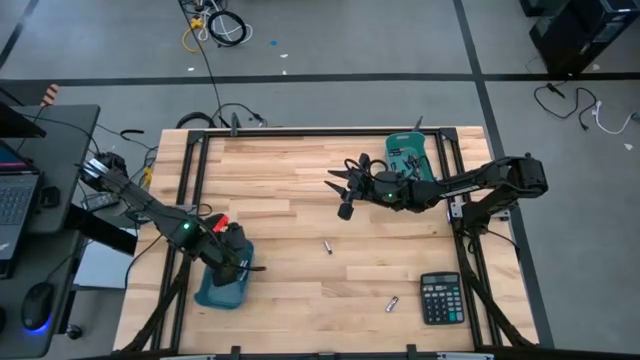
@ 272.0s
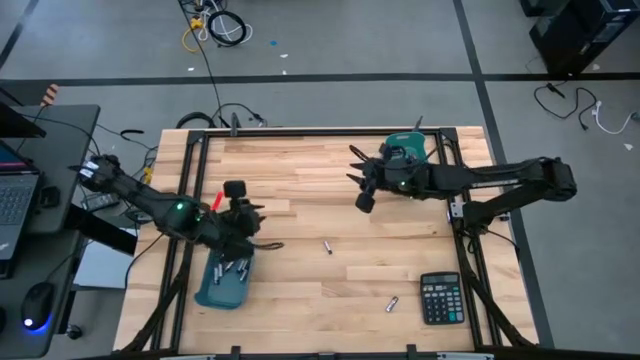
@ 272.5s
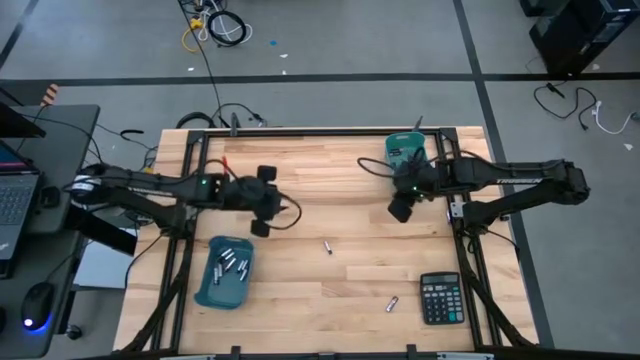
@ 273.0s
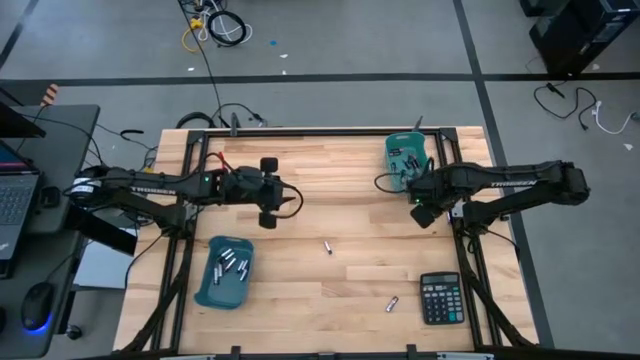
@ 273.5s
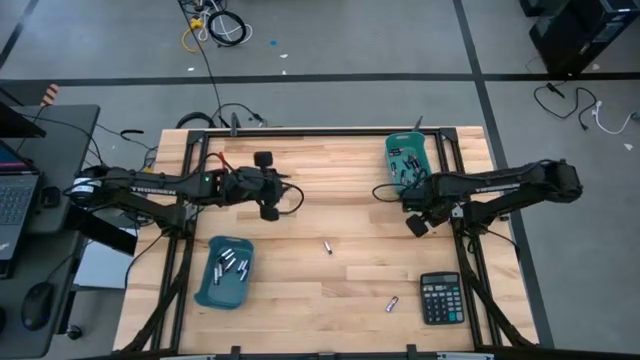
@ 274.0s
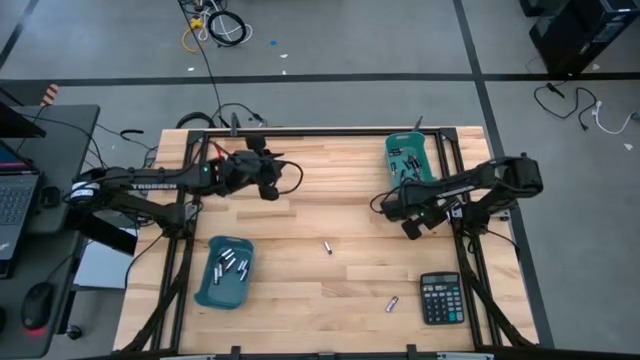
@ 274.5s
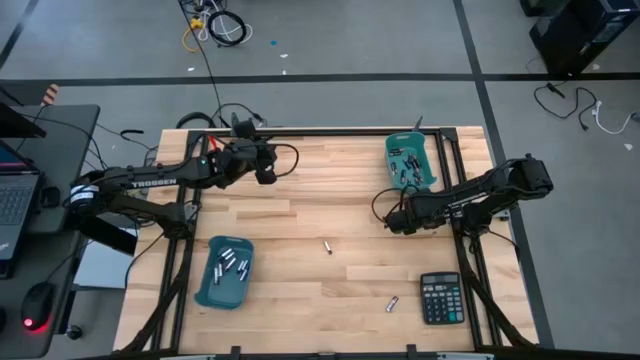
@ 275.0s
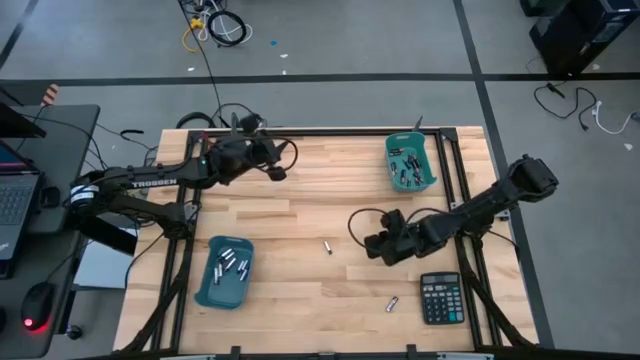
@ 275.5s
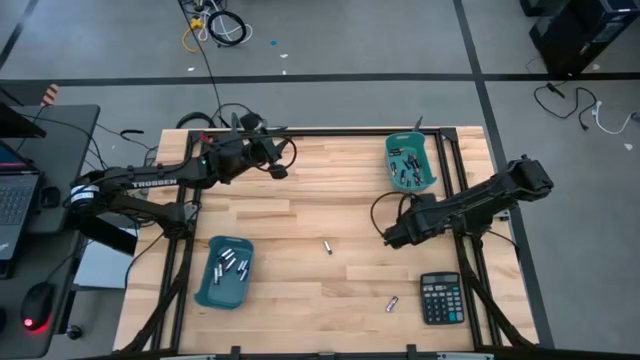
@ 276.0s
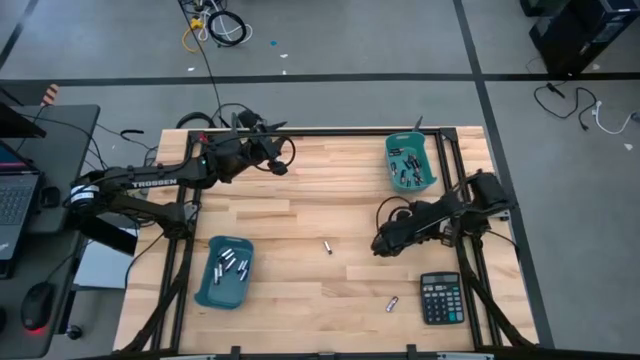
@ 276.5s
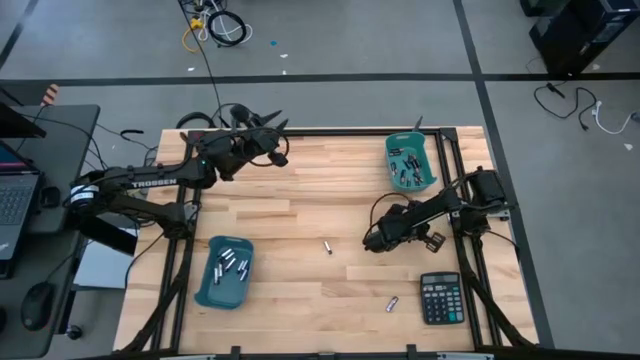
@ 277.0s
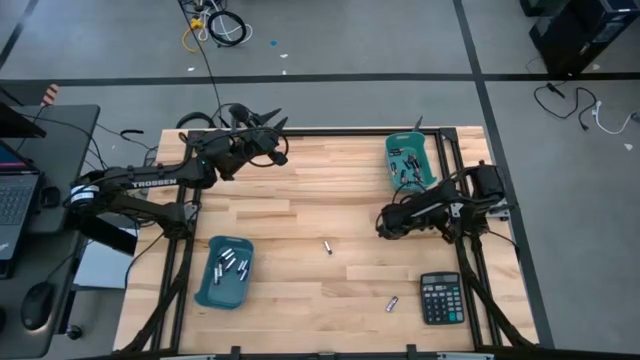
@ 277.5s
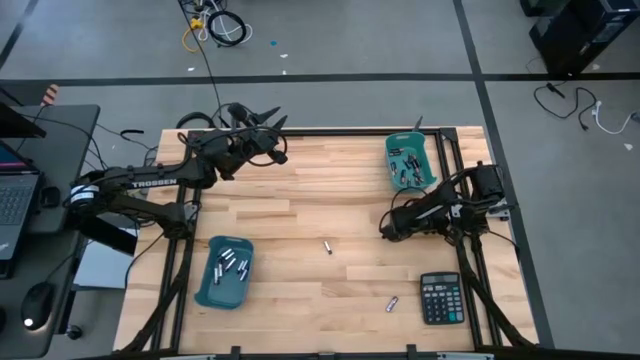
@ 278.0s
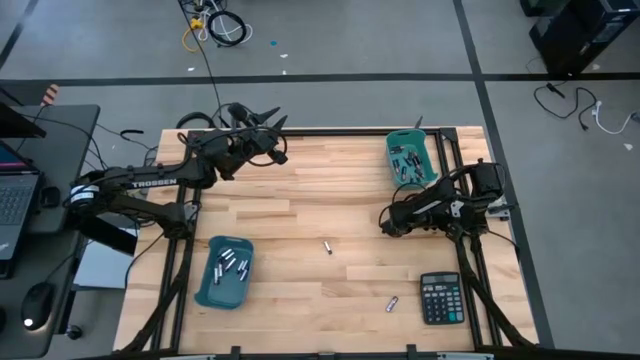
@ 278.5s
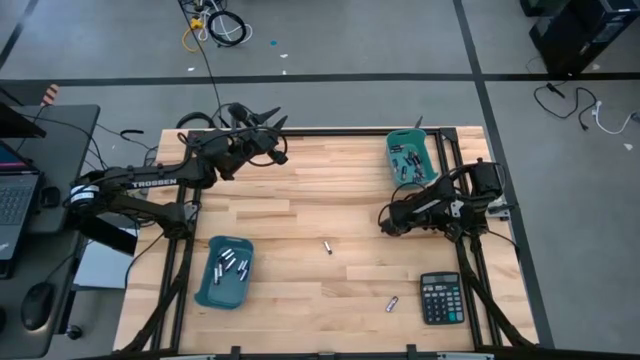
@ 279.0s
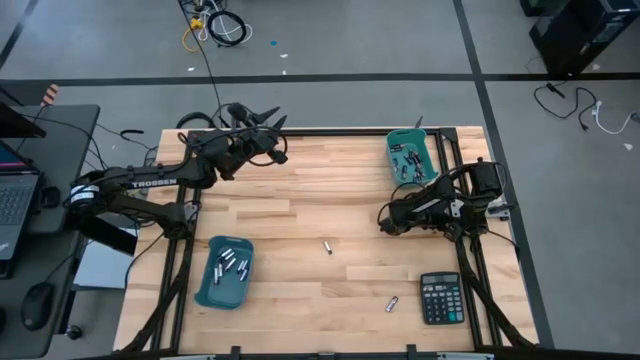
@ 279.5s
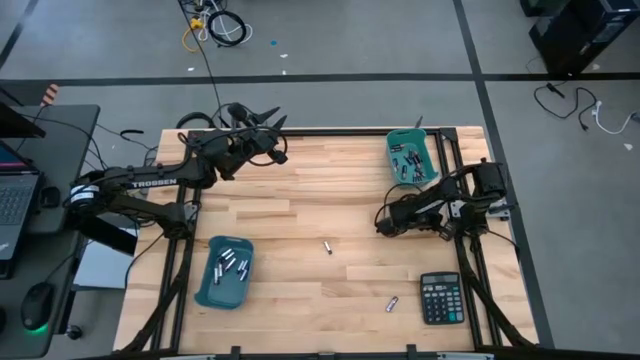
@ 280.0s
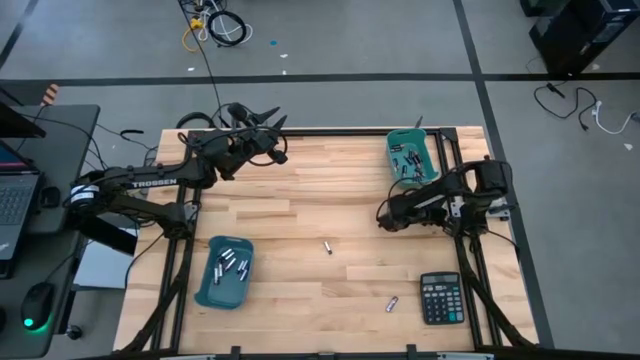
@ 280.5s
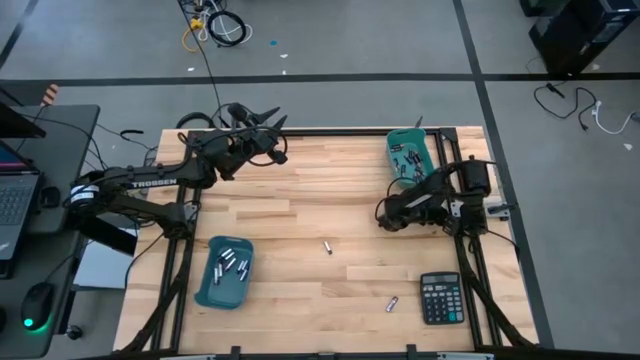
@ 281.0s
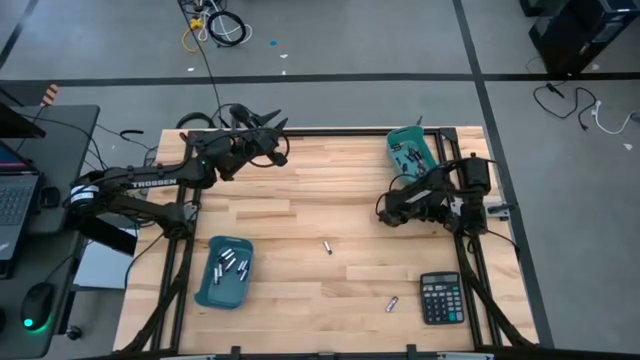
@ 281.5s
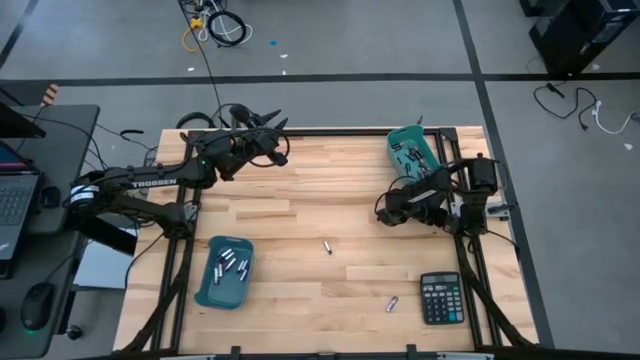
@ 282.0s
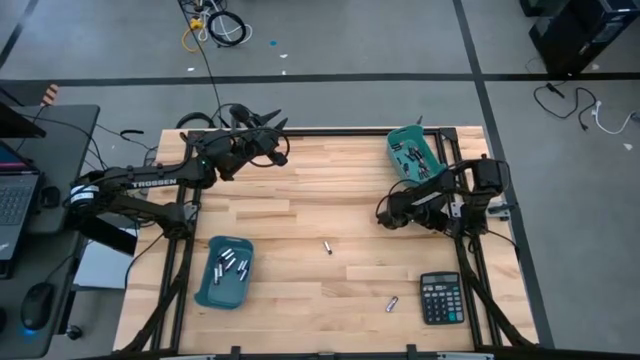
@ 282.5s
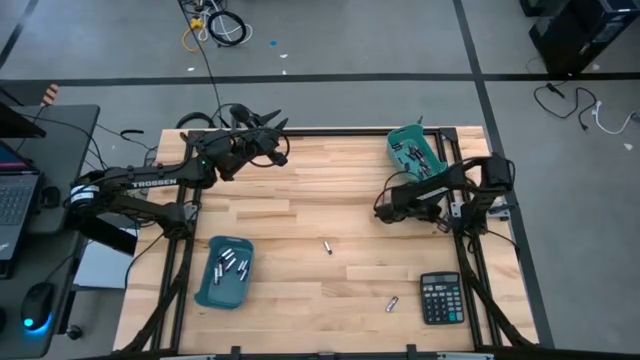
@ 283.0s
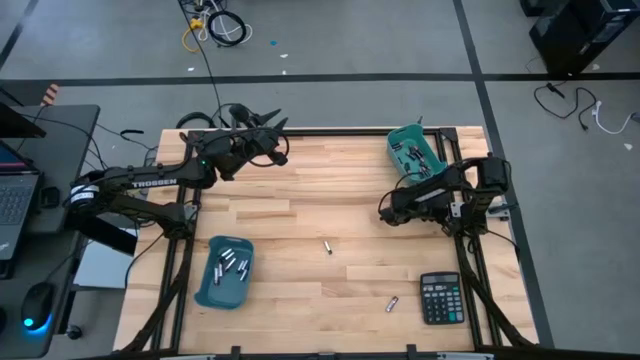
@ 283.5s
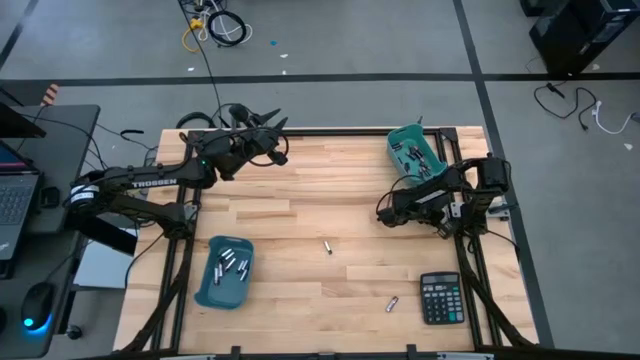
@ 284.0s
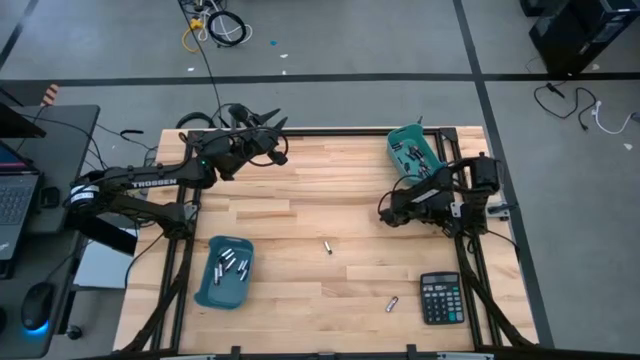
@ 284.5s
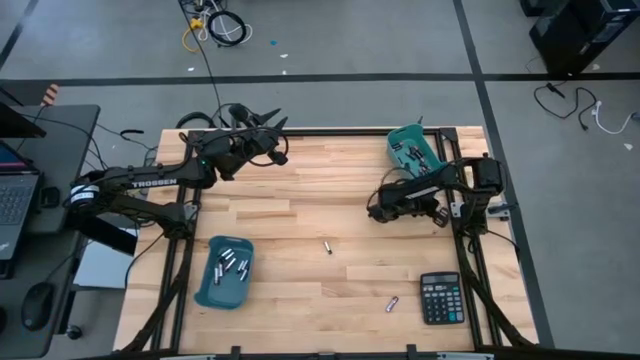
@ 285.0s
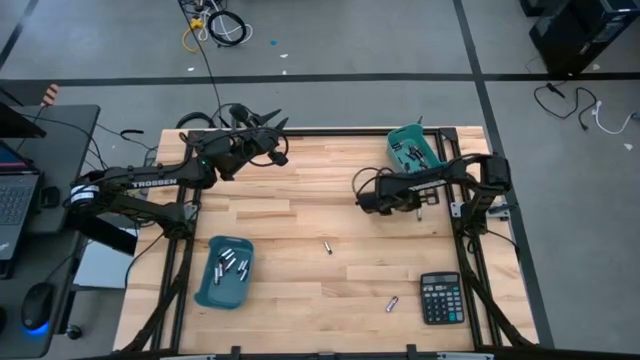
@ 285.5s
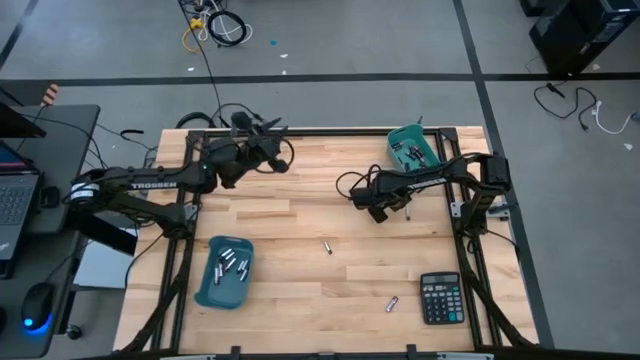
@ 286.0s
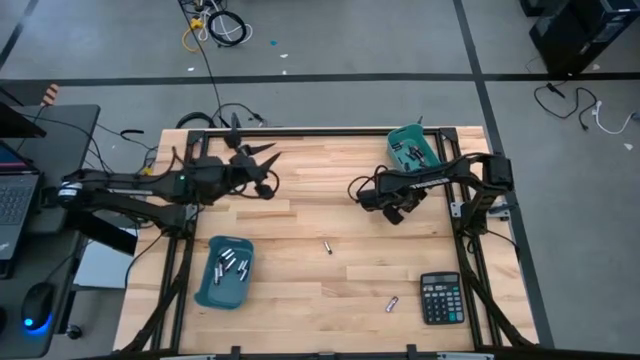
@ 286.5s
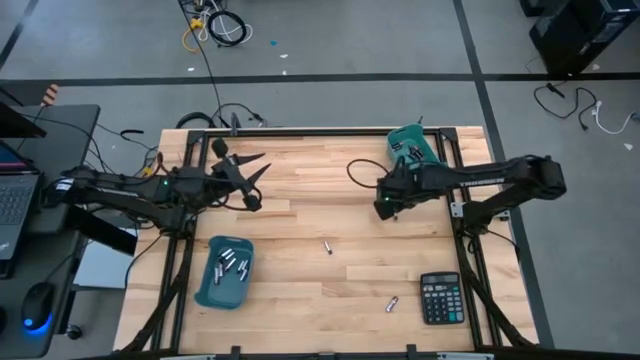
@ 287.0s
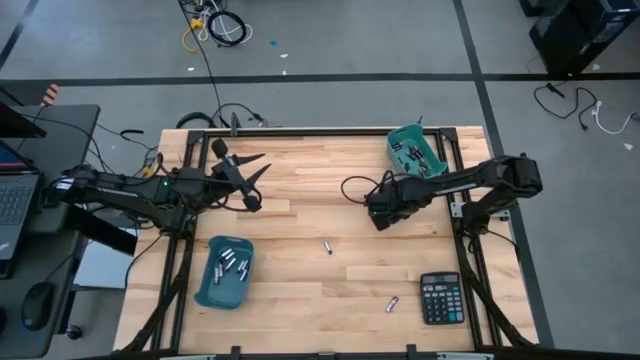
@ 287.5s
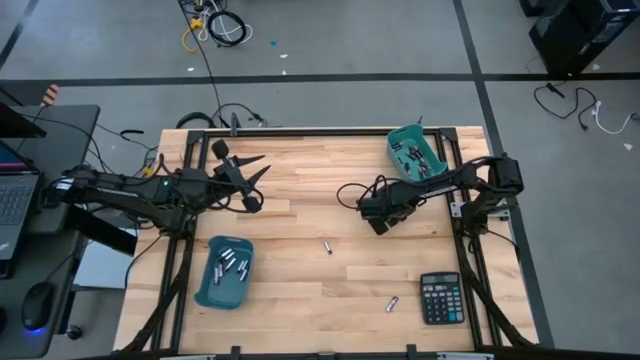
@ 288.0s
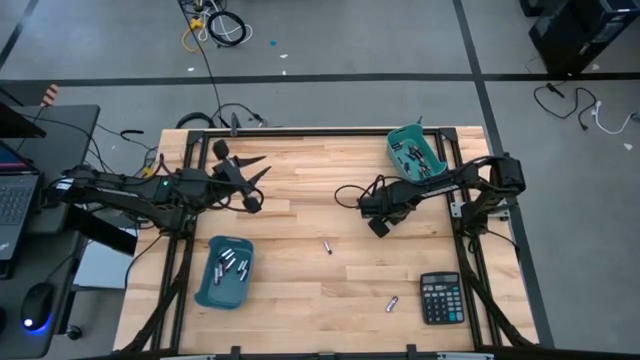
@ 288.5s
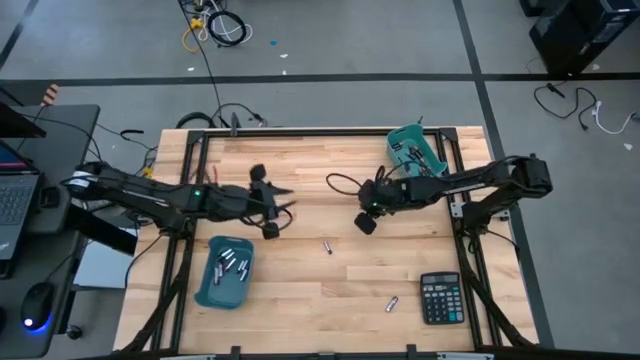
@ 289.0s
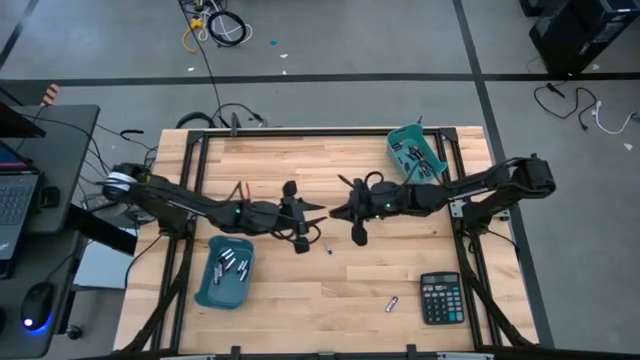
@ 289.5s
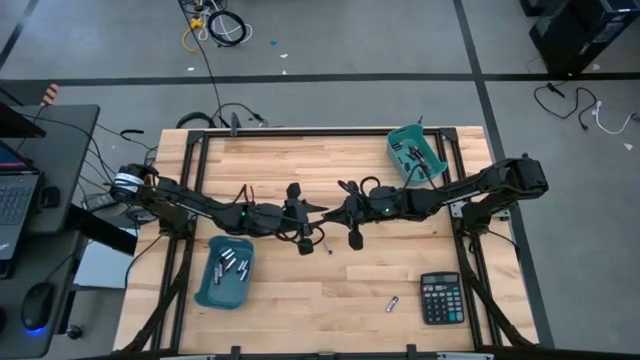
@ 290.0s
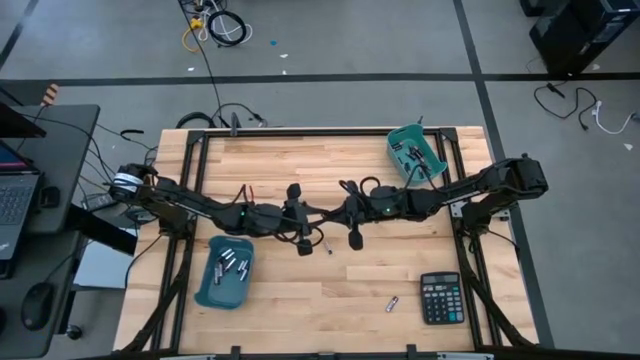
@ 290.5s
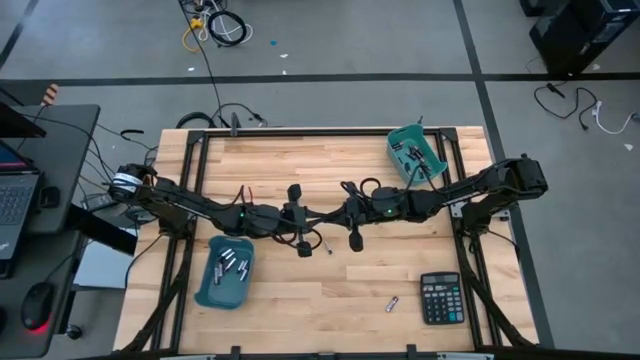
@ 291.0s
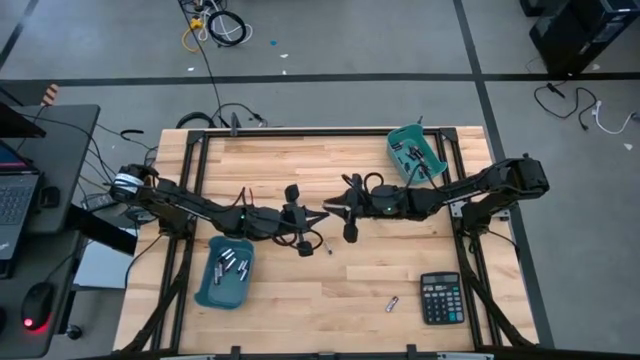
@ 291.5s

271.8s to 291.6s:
Task: Sort batteries
Put the silver battery into the blue bin

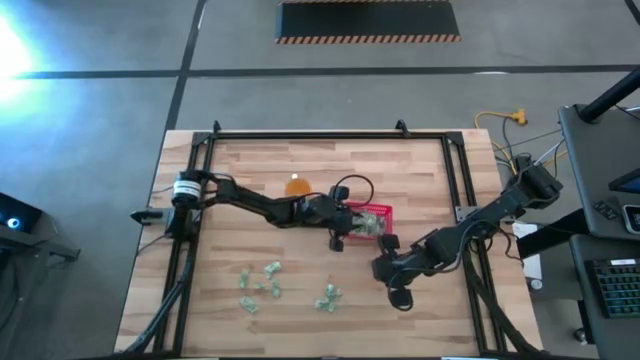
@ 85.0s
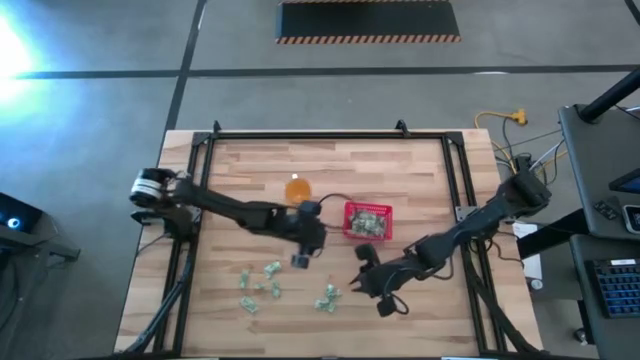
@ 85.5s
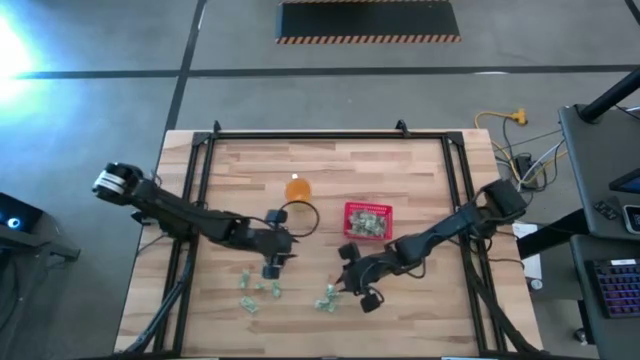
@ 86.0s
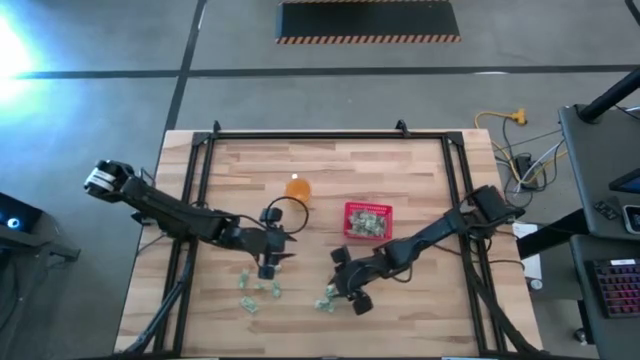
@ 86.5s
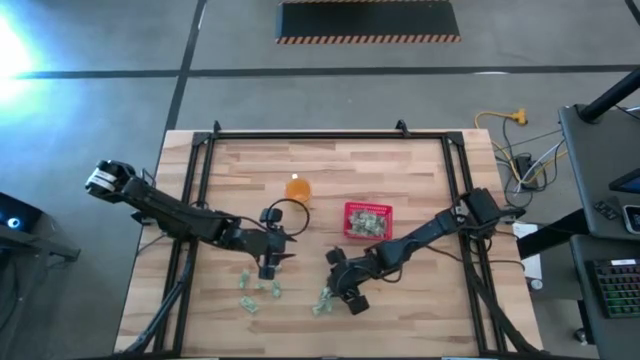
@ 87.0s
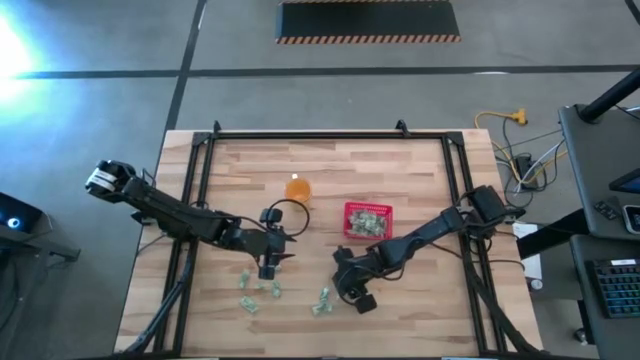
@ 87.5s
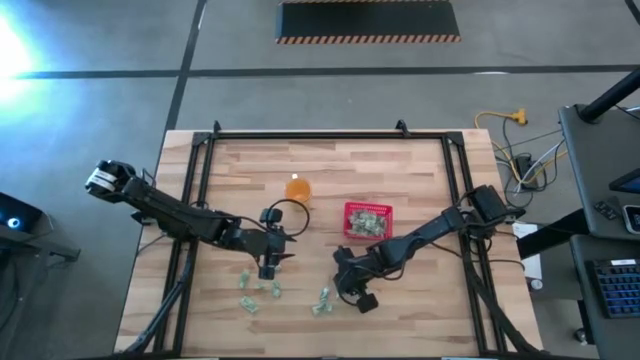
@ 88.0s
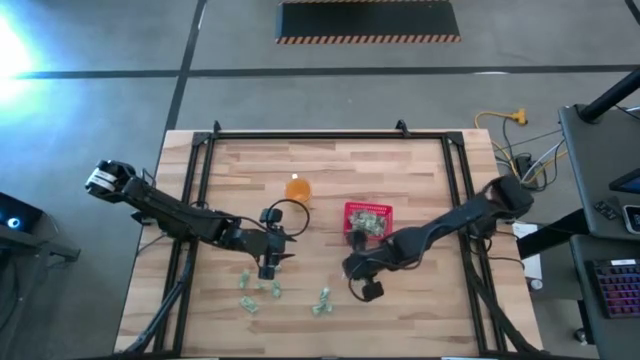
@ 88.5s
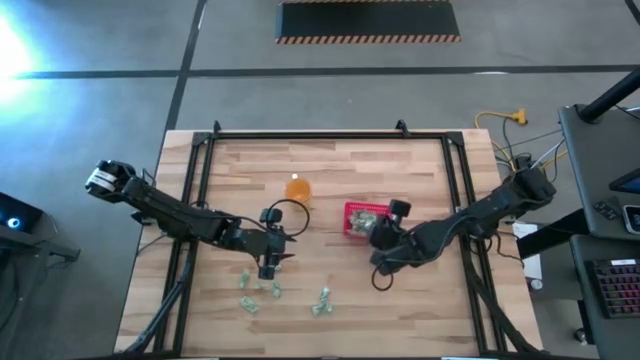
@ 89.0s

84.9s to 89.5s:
Task: Pick and place Stevia / Truvia into bins
Put the stevia packet into the basket
